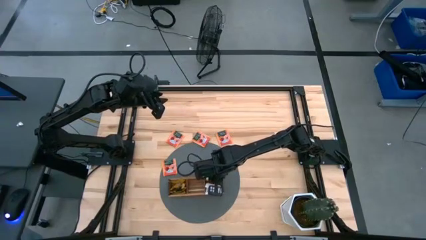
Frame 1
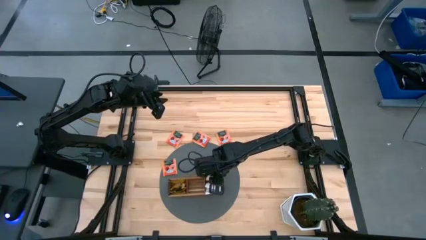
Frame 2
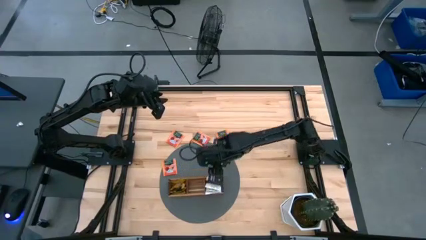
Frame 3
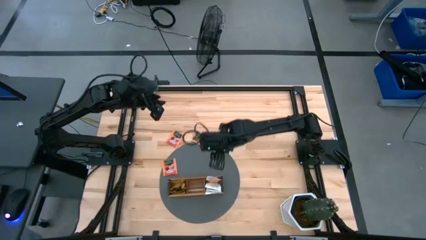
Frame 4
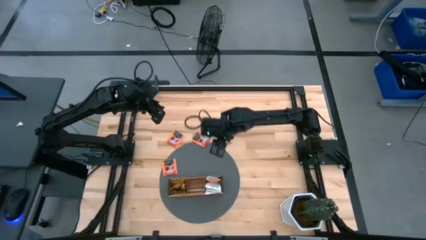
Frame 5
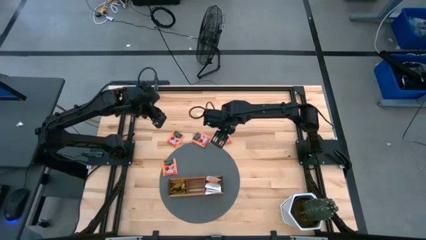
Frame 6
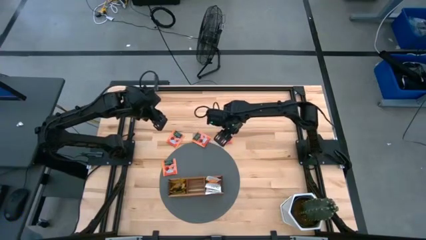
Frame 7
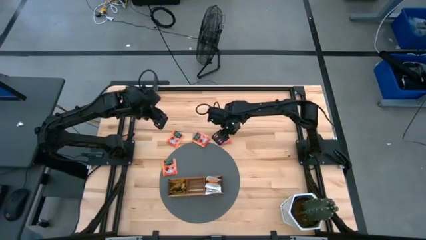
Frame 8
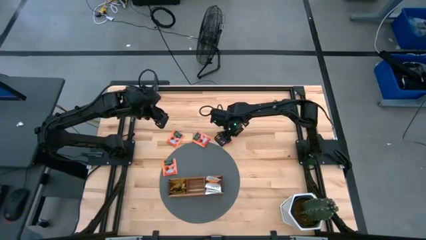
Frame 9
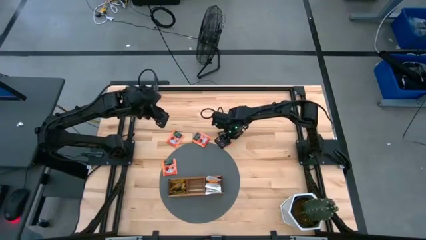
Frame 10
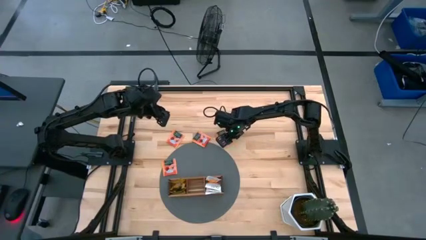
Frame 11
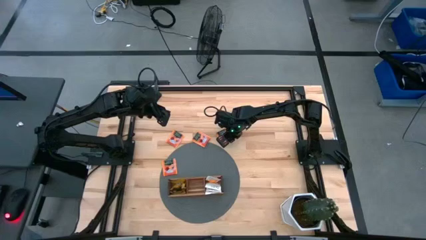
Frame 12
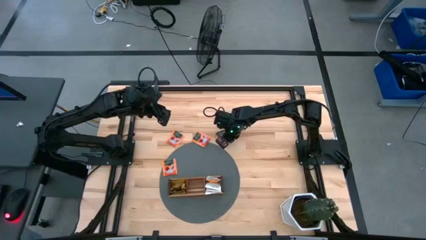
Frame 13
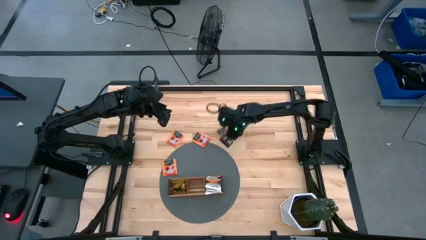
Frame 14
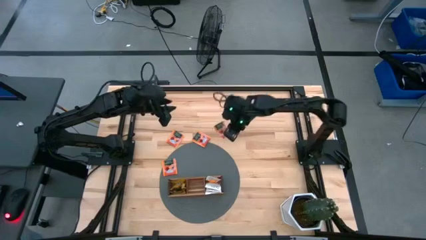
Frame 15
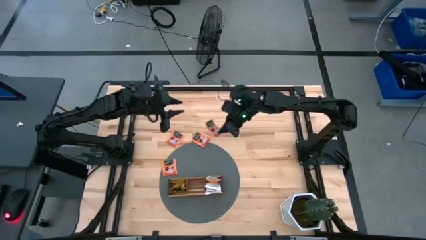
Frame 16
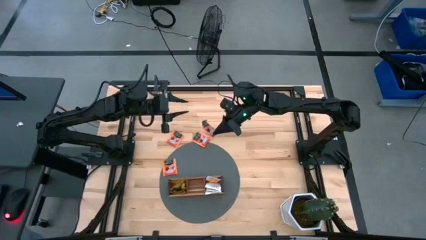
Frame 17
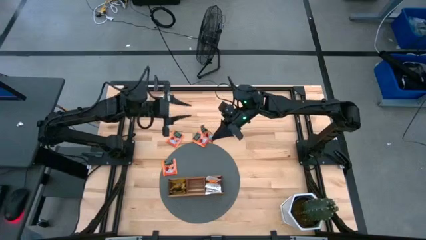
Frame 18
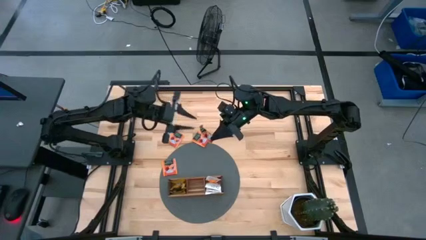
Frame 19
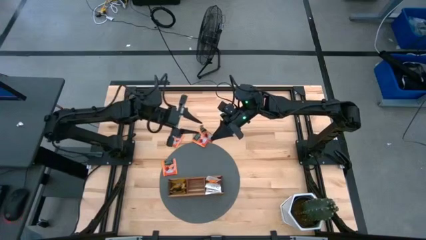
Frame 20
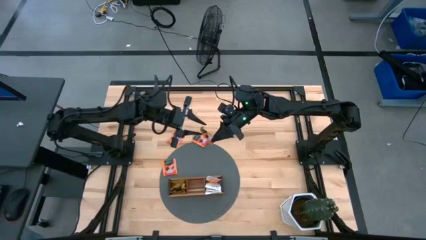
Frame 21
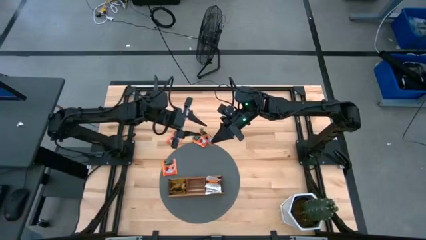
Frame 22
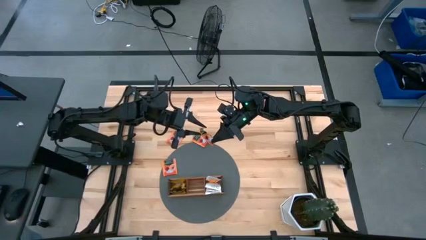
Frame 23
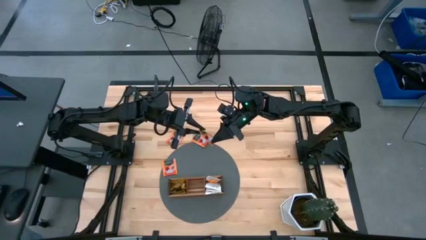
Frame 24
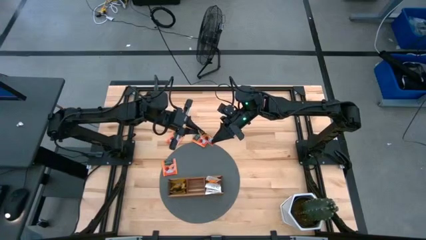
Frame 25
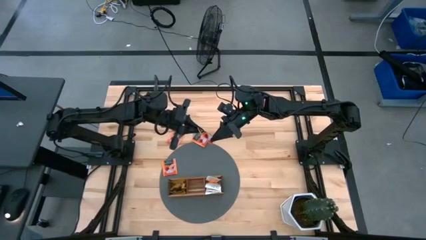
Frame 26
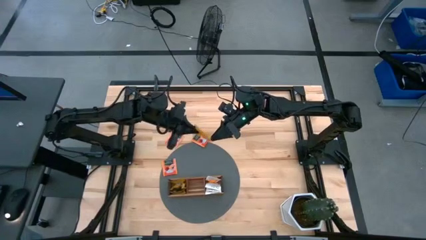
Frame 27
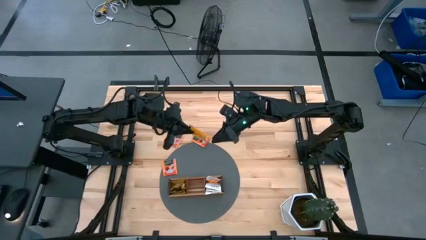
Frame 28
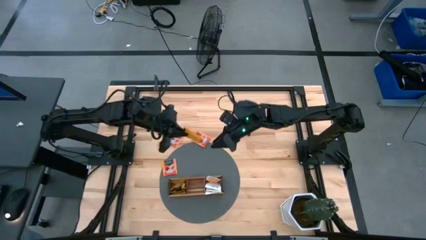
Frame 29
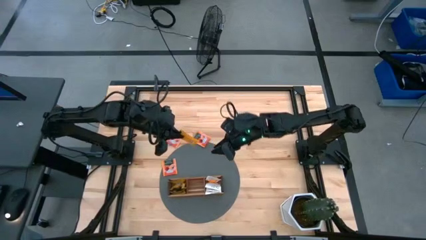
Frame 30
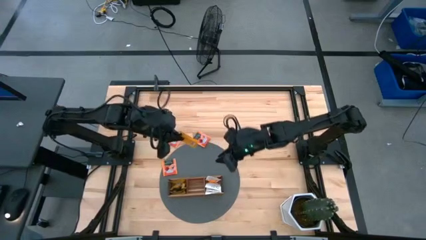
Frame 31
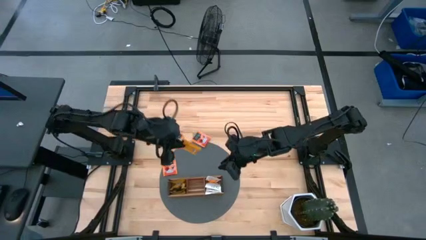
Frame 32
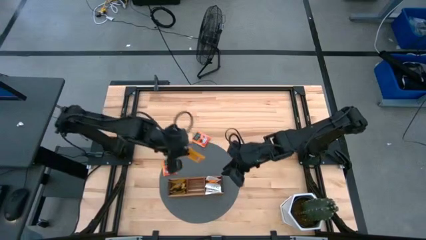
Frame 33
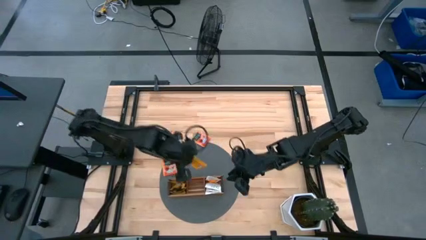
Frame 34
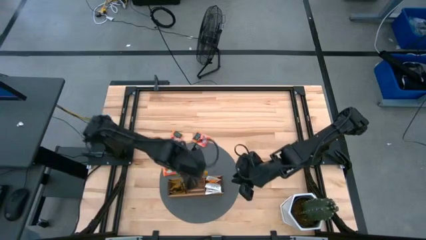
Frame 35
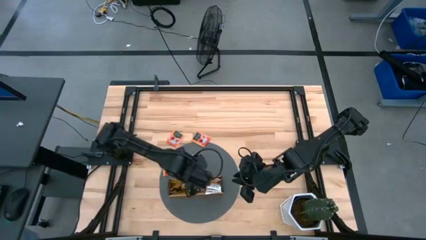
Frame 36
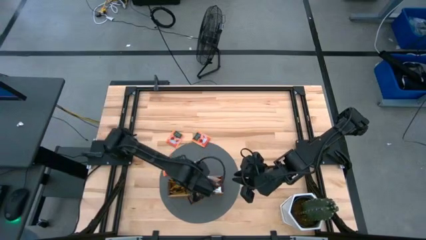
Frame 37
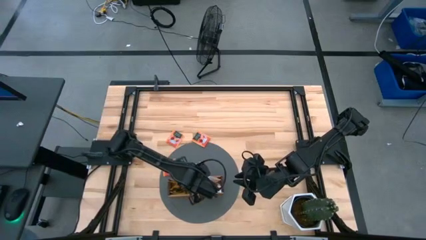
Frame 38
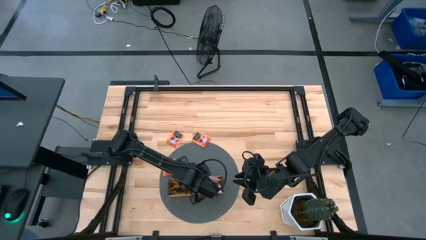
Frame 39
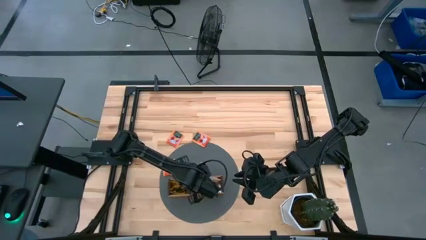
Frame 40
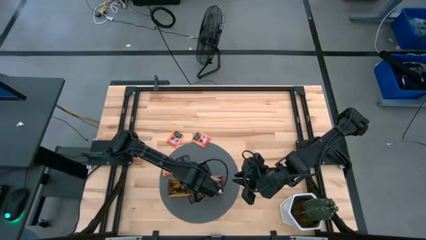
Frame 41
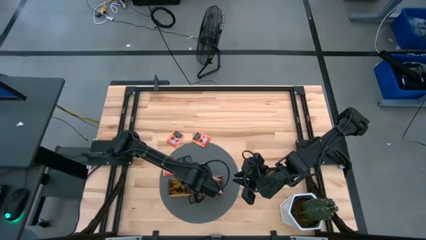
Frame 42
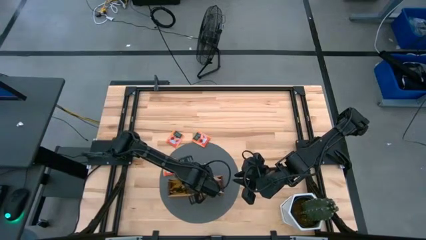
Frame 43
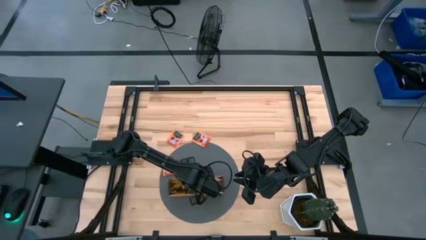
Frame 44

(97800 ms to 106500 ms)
Task: Pick & Place Tea
Put the orange tea bag into the middle section of the wooden organizer

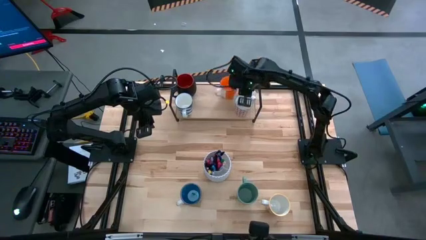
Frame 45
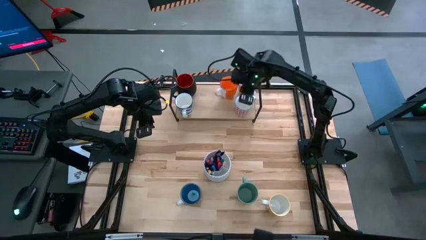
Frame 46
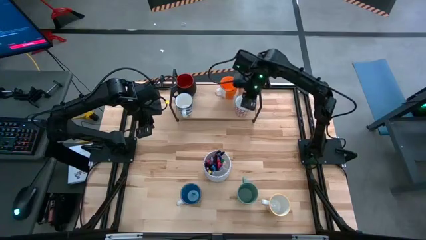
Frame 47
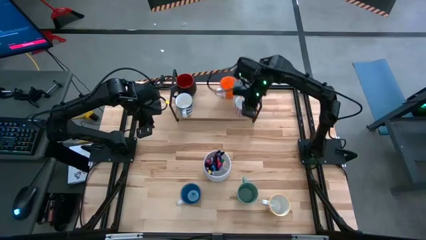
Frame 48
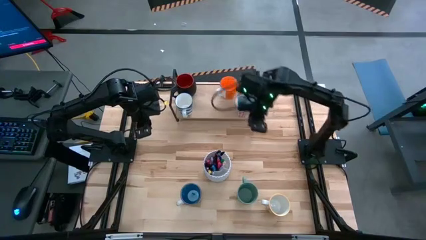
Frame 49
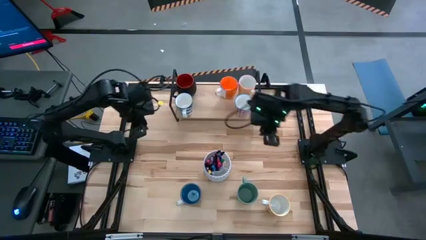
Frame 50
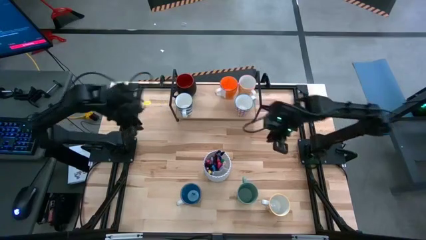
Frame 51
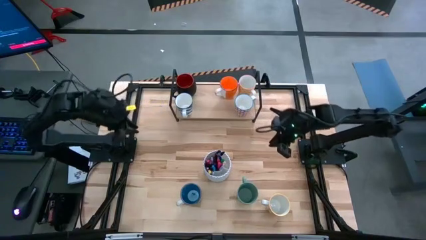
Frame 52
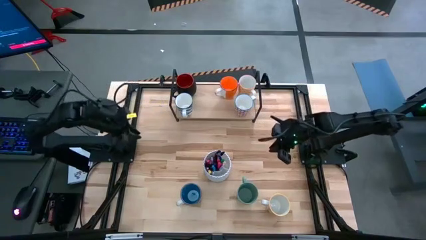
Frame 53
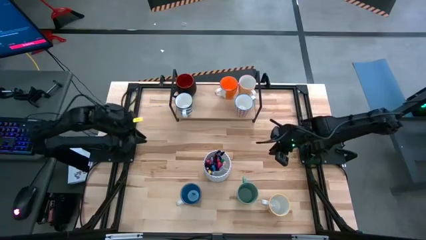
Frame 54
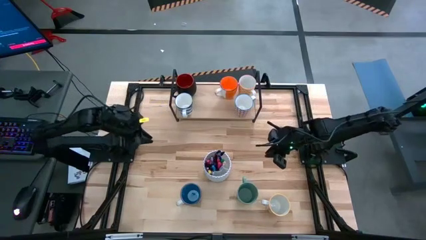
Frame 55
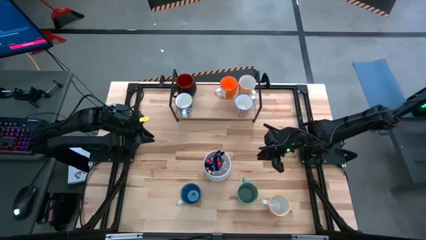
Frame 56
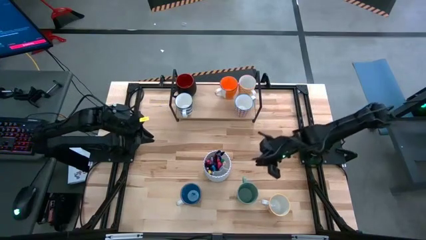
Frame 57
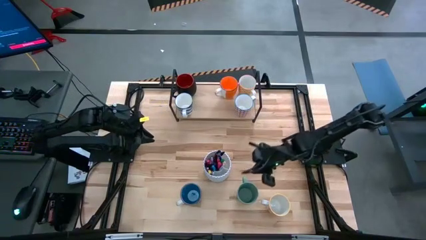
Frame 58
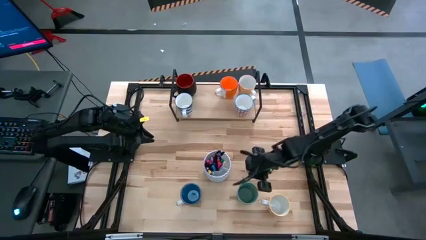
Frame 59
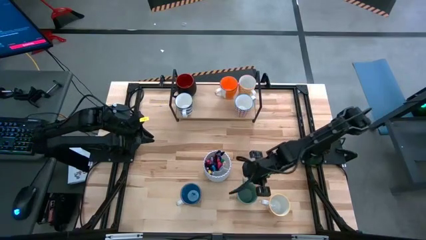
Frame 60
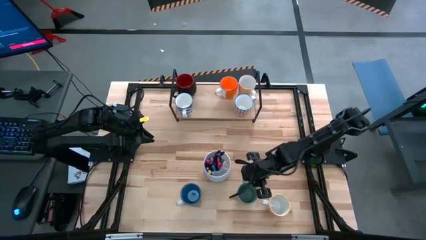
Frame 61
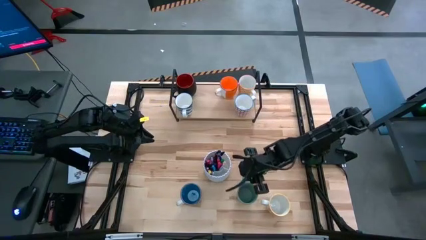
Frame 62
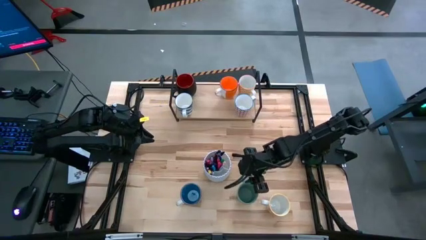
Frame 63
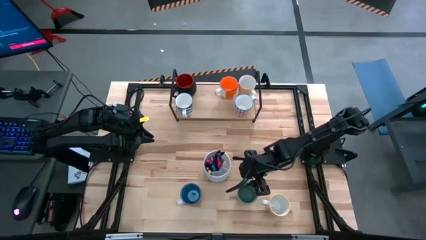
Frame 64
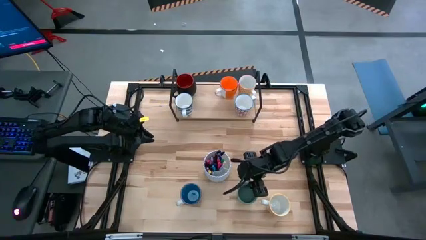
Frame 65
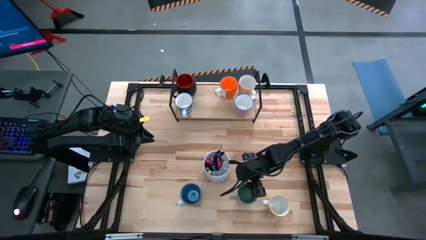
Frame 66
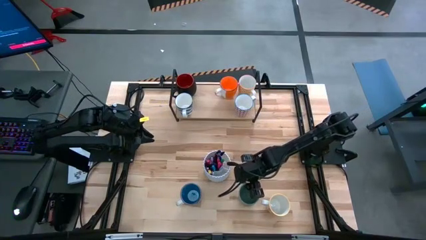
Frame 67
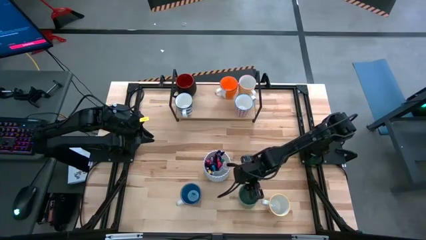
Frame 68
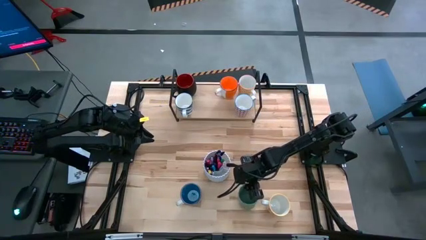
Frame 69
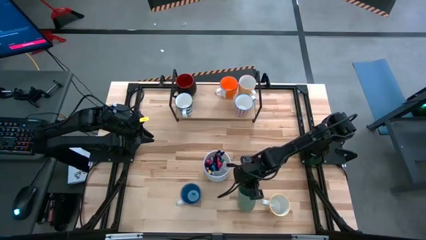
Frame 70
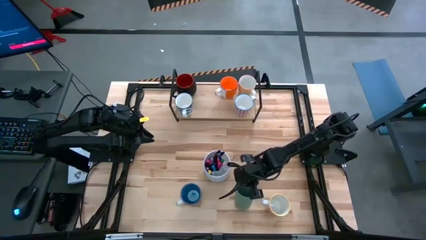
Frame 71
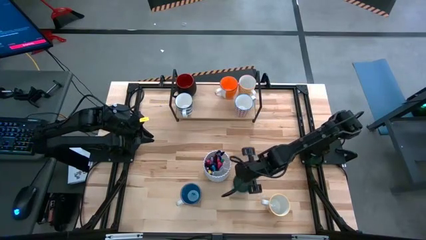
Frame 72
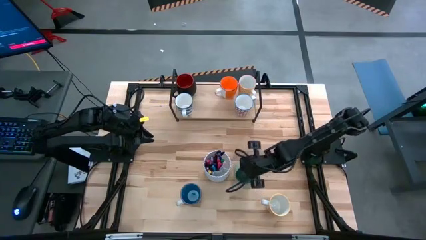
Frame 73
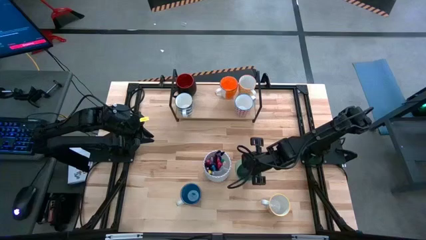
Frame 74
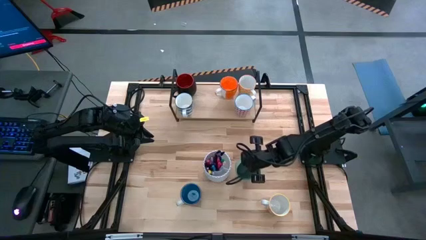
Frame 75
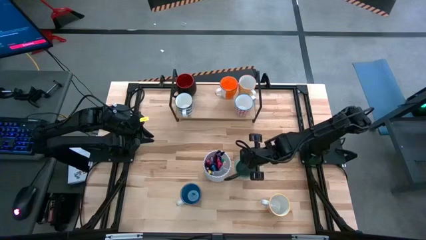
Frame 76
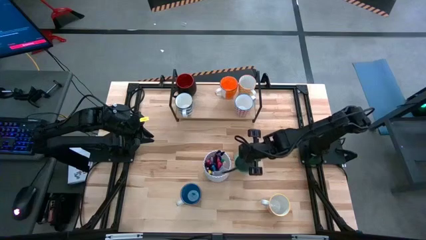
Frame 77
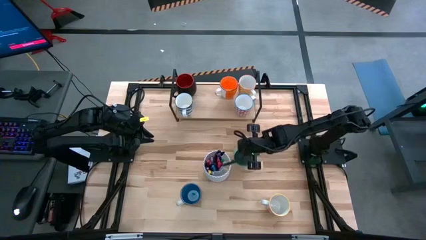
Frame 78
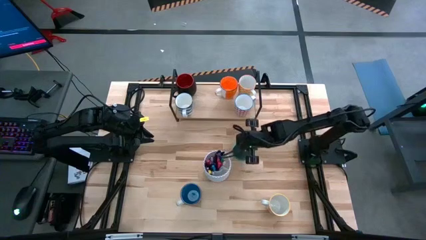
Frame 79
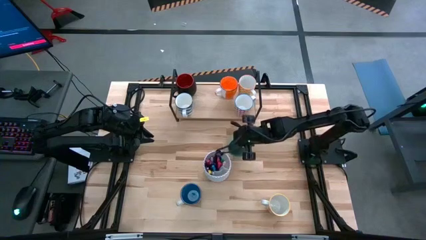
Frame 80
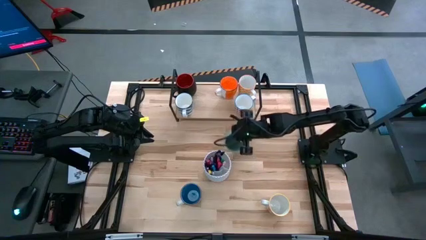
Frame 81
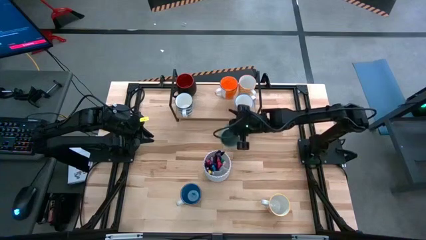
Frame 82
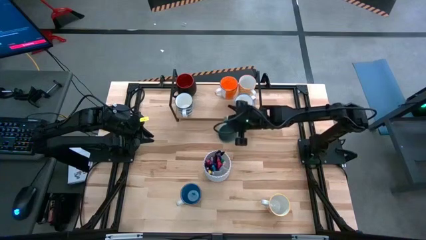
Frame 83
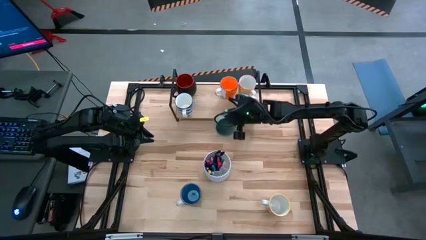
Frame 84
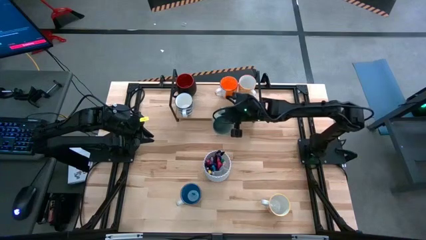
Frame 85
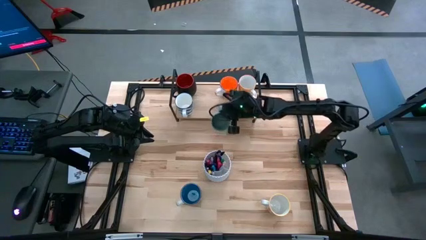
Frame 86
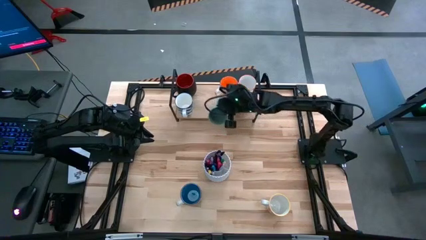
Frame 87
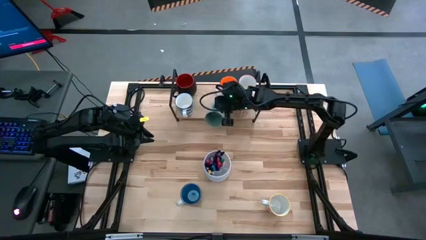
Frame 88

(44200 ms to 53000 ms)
Task: Place coffee mugs
Put the green mug on the shelf
